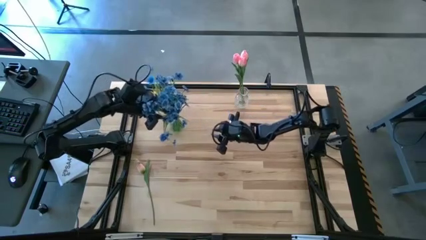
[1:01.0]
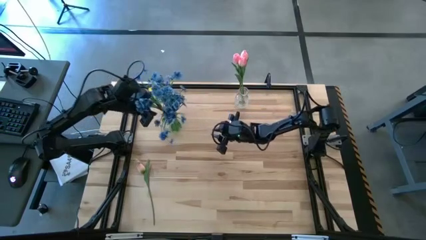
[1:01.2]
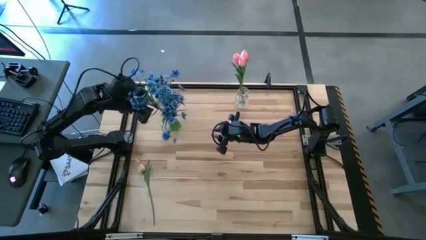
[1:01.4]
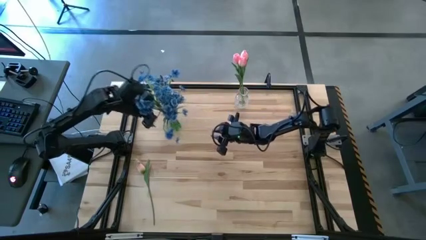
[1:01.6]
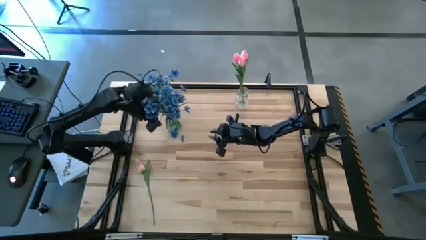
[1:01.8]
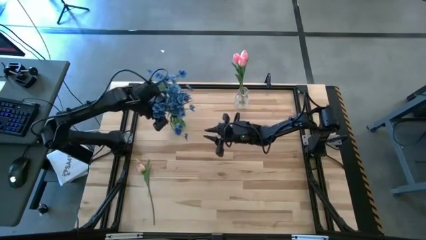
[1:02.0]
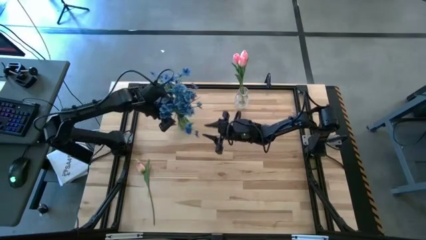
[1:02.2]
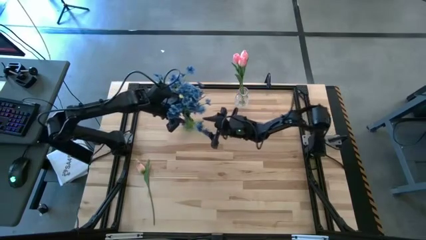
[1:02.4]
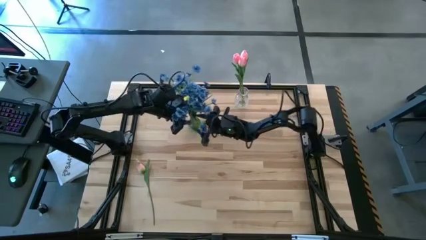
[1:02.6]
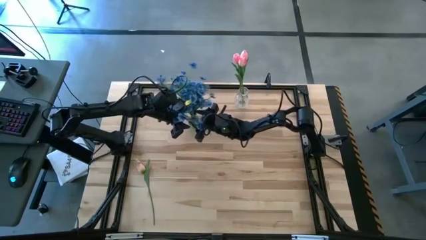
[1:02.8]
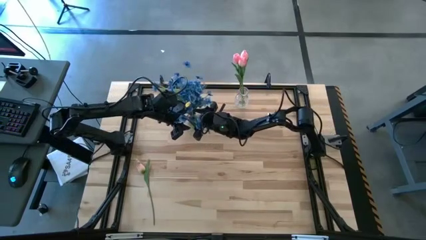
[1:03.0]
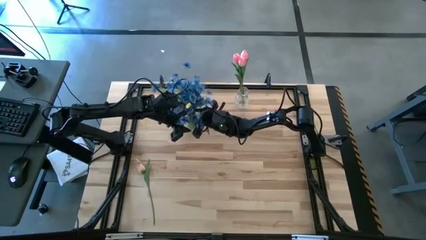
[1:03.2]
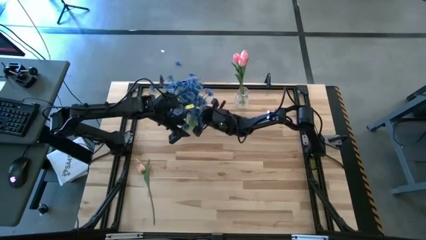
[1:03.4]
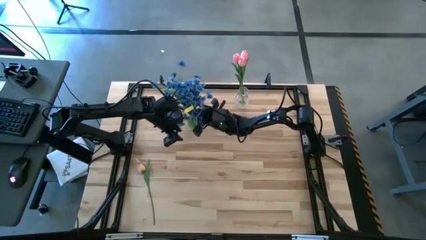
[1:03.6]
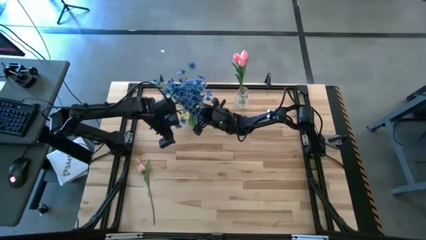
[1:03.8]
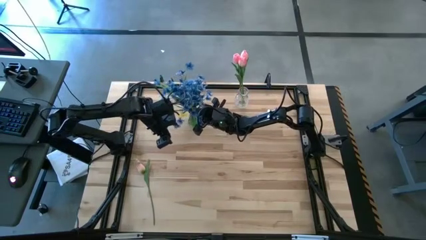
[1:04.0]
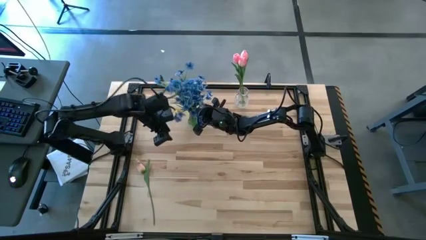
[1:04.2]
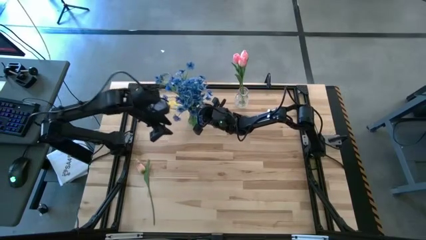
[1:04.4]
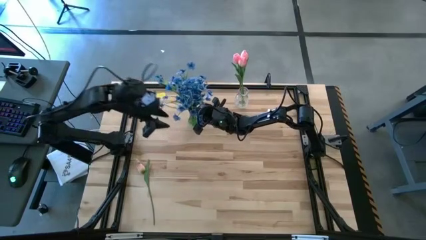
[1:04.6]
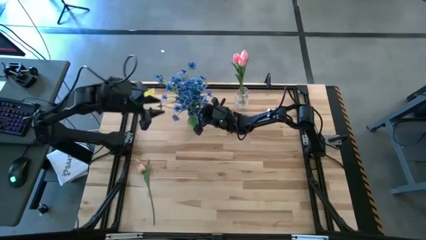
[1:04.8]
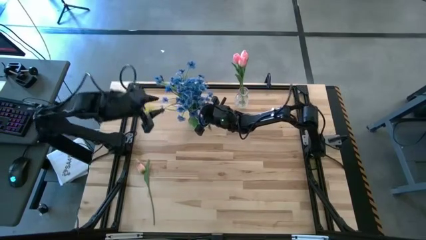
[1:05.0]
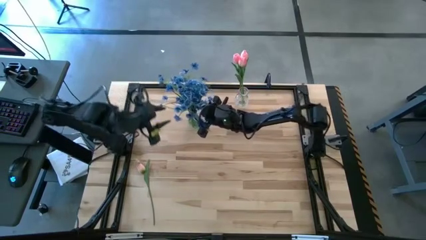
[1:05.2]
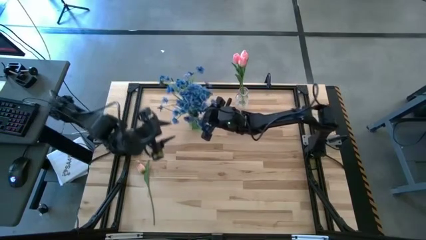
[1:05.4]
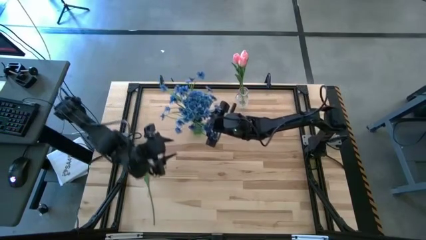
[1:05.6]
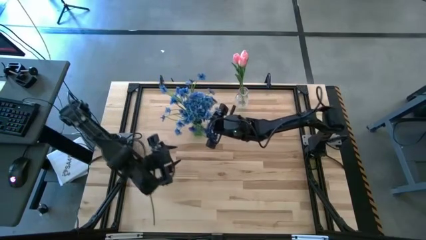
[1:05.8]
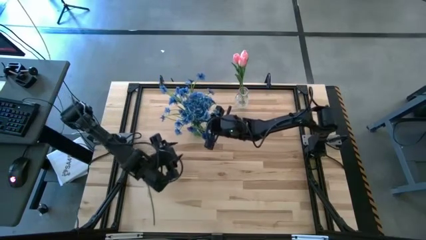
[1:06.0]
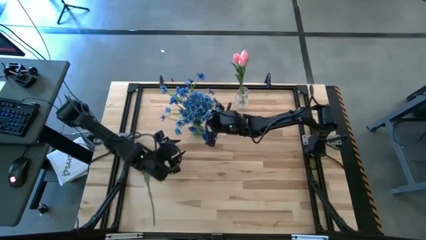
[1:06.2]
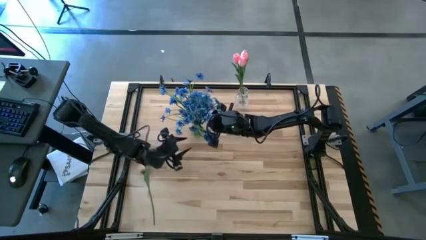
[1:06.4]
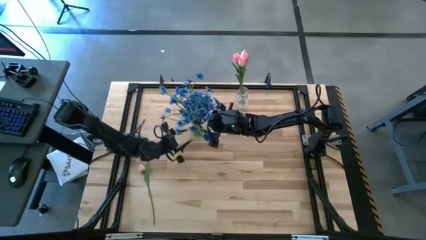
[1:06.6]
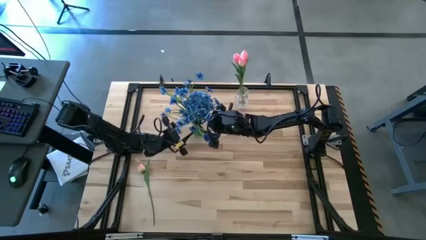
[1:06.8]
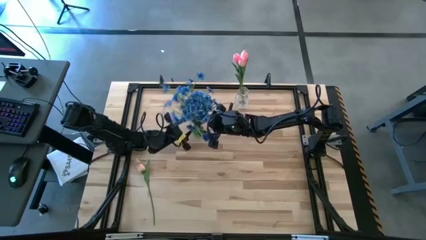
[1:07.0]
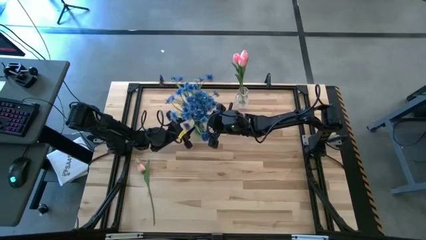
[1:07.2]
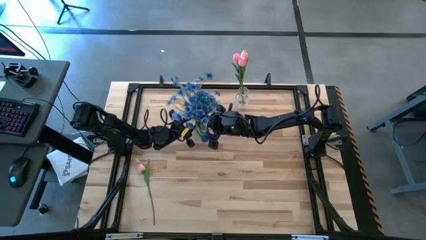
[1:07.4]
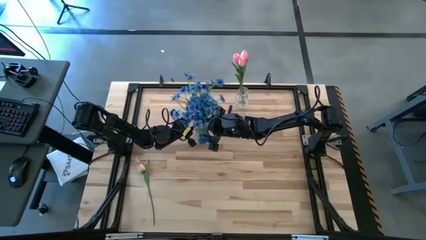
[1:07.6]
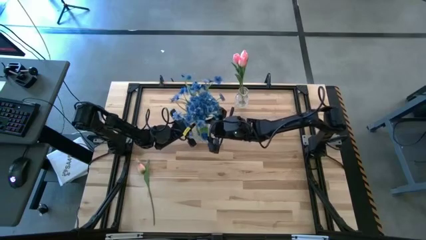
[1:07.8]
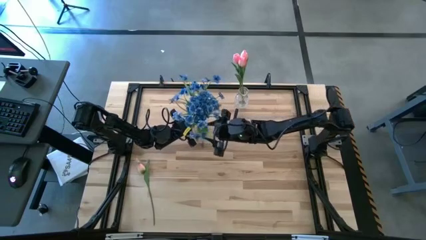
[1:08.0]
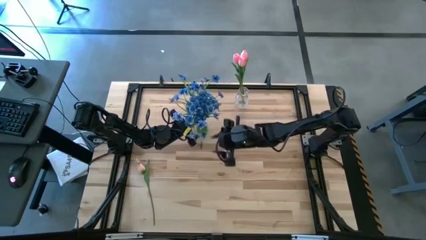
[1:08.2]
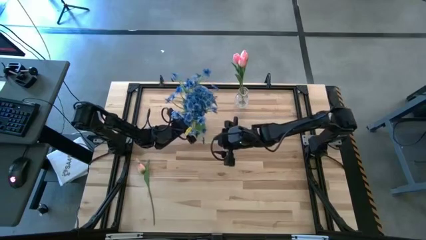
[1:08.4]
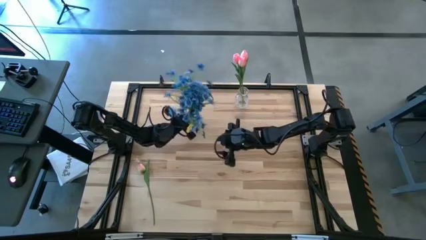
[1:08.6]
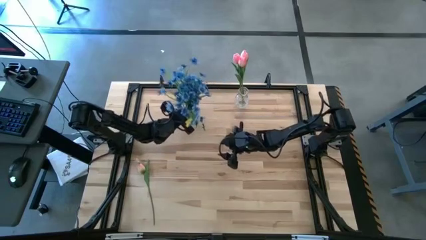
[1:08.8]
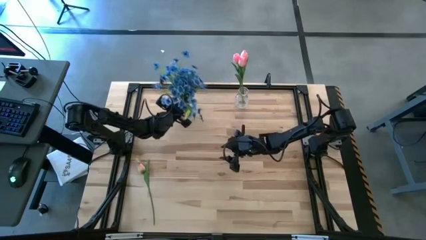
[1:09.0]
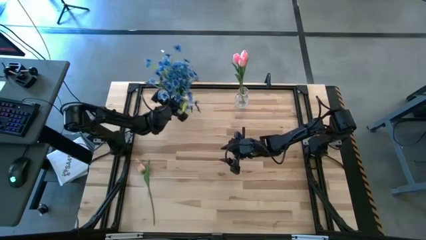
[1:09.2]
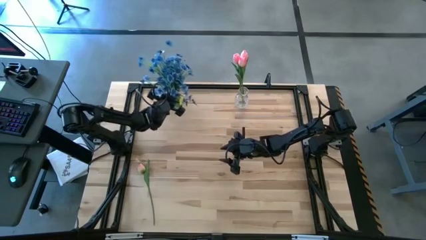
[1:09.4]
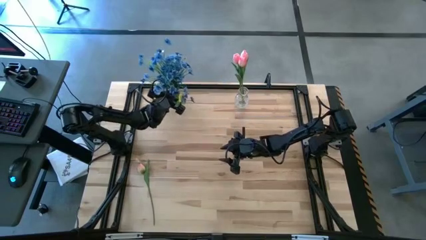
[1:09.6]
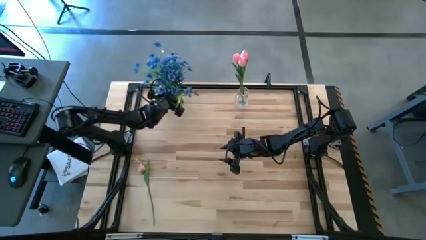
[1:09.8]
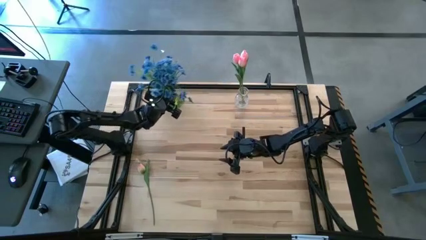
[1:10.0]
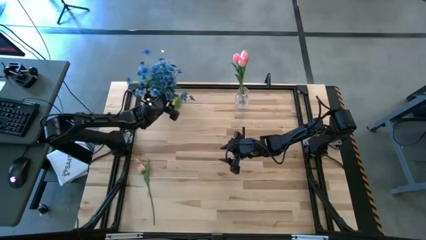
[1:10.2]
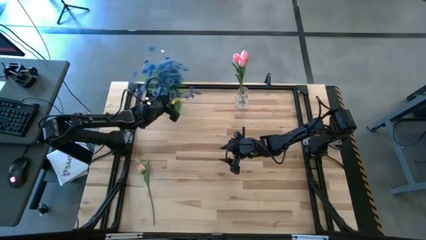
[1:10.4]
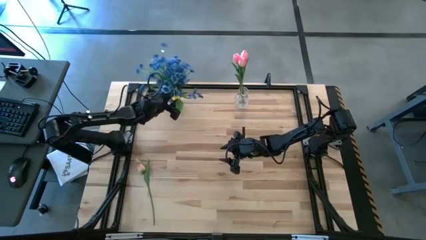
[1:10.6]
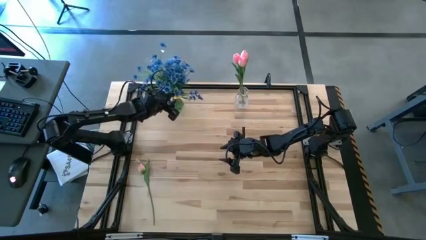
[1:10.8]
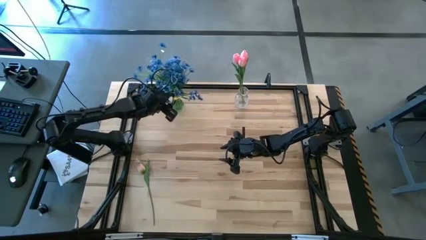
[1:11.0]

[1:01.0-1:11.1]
Task: Sort flowers into vase by color
Adjust the green vase

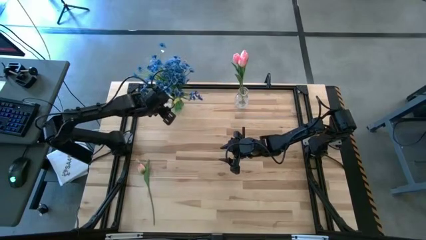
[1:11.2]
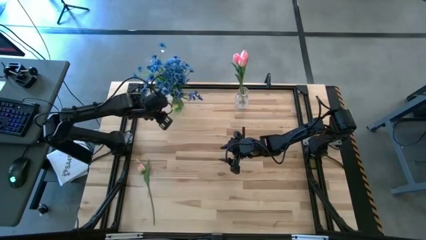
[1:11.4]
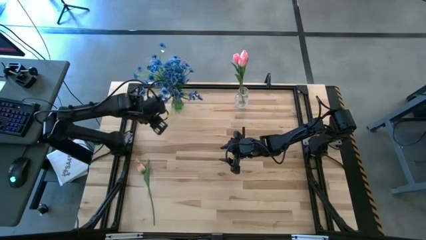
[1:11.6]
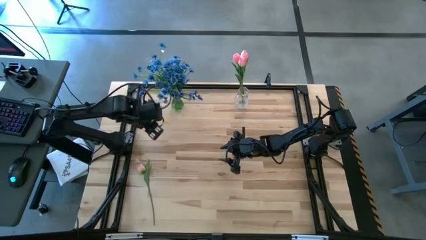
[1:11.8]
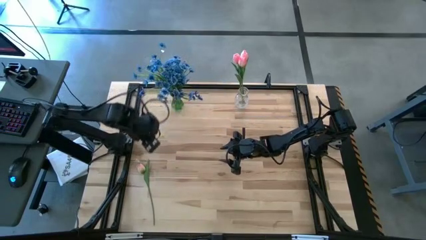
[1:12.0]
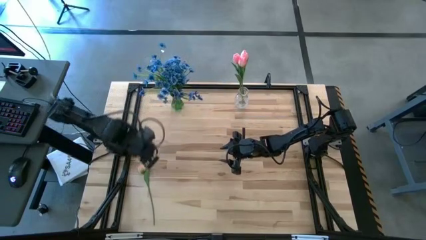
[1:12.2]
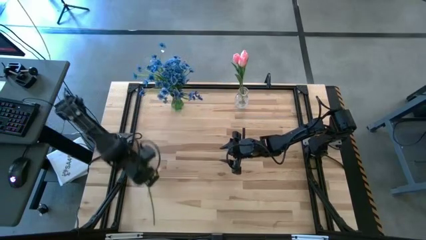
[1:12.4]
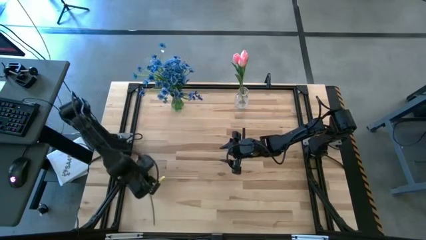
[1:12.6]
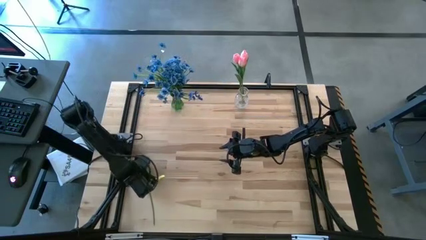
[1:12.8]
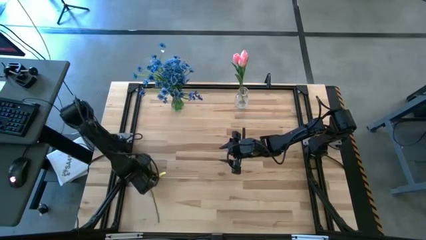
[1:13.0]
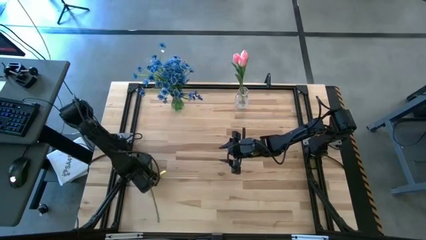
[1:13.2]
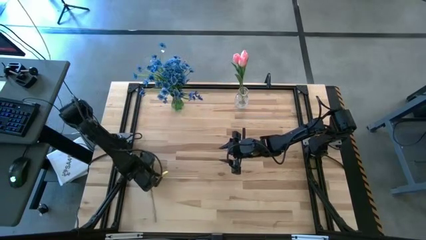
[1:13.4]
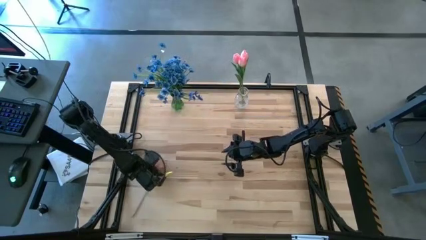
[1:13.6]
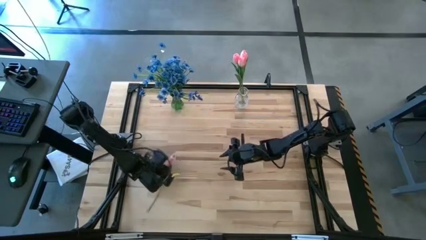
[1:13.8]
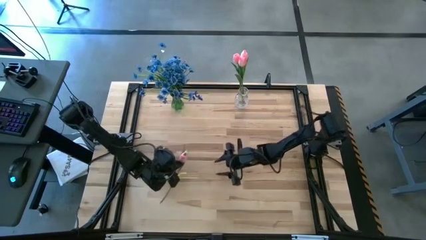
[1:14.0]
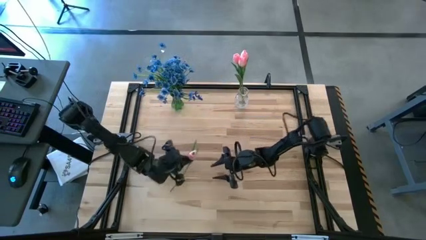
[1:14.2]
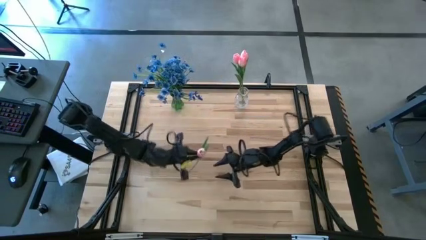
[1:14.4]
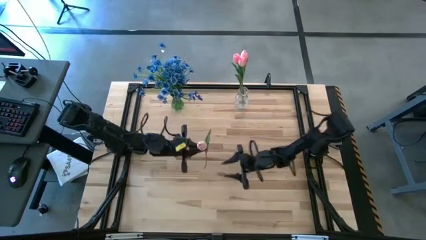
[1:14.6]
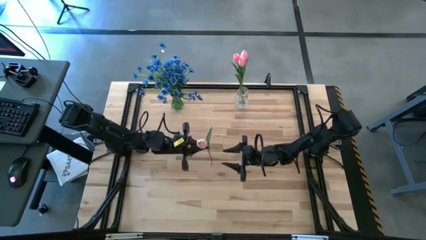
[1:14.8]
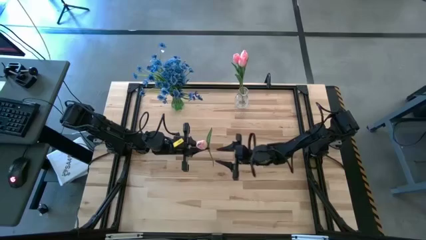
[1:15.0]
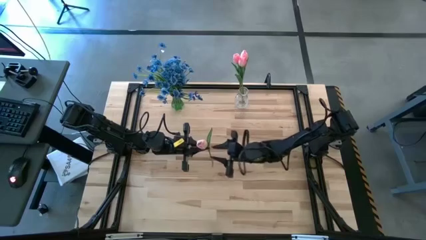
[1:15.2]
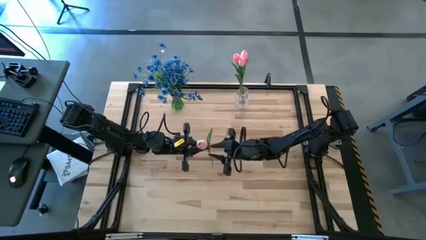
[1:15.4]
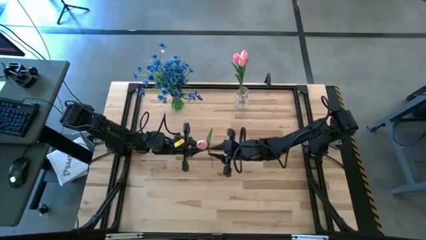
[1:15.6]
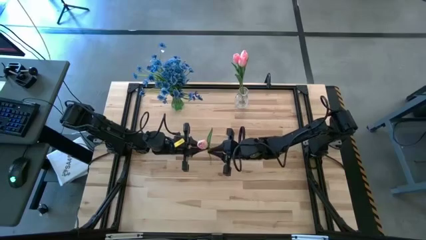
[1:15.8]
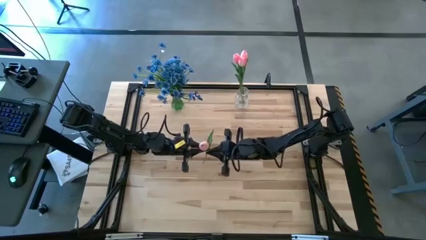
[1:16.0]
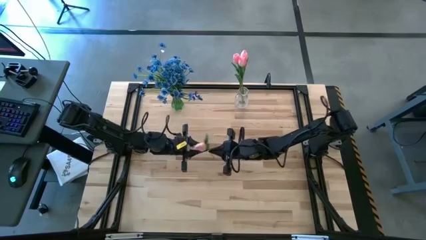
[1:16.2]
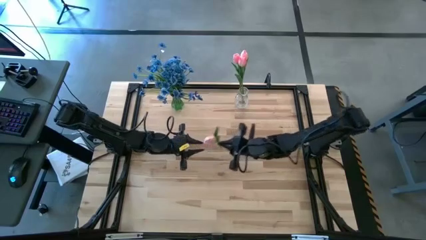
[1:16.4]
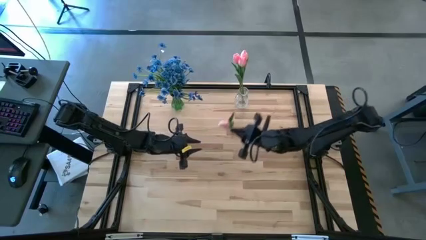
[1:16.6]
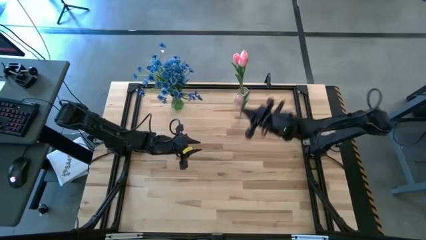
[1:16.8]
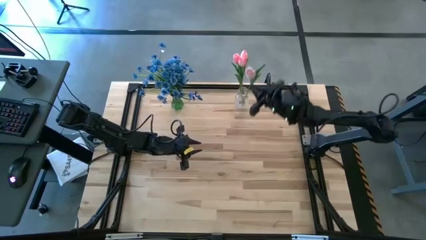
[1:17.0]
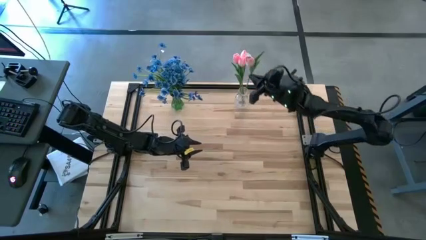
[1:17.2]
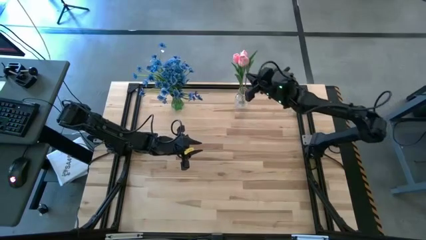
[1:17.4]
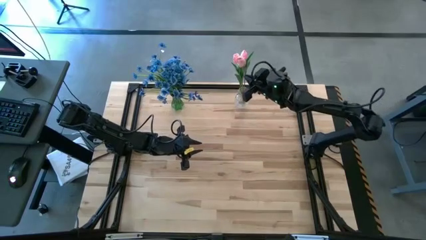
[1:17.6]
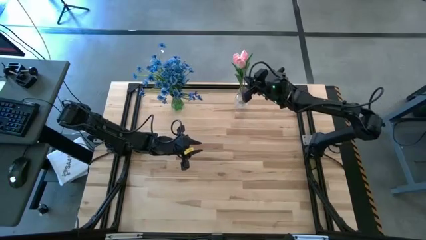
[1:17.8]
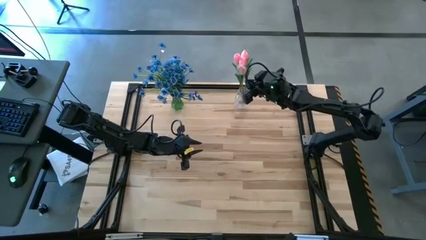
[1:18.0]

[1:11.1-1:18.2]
Put the pink tulip into the transparent vase
